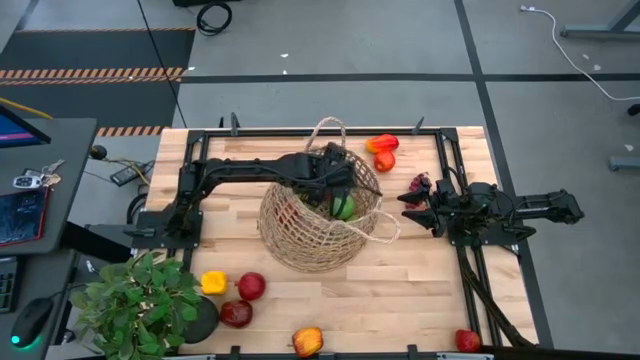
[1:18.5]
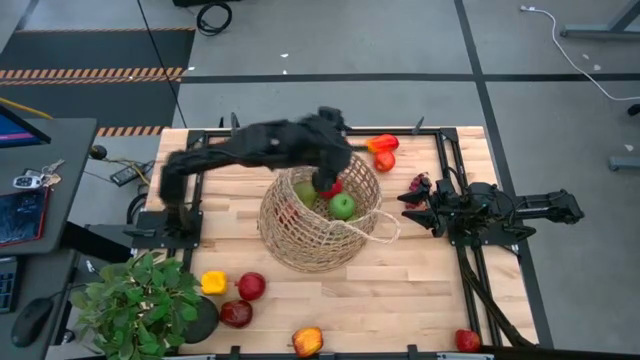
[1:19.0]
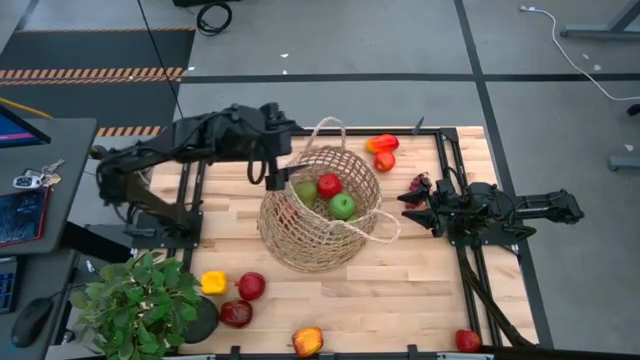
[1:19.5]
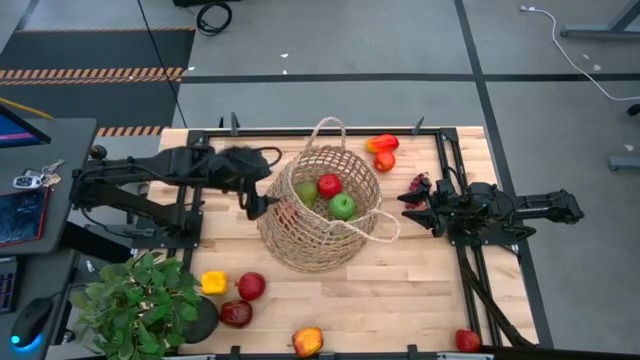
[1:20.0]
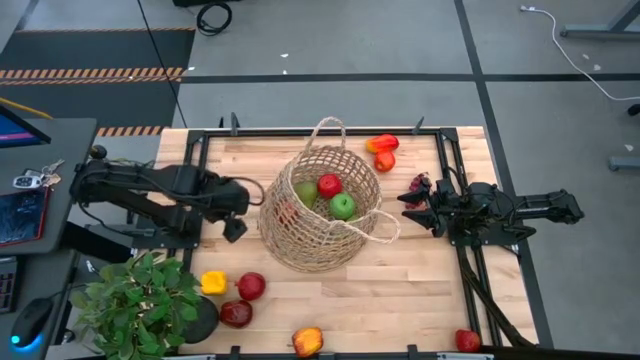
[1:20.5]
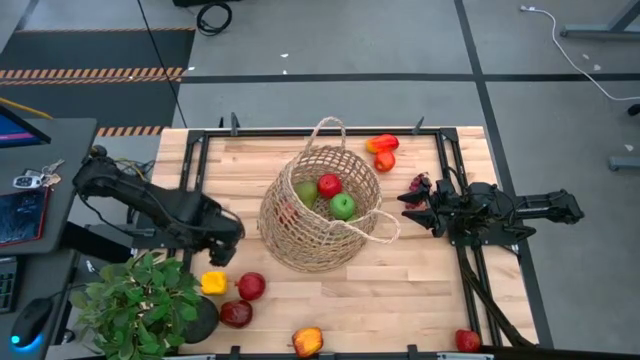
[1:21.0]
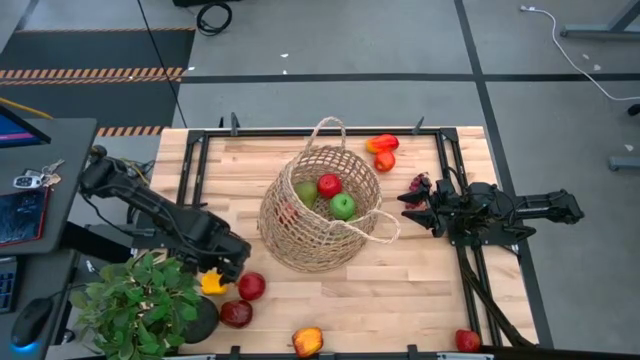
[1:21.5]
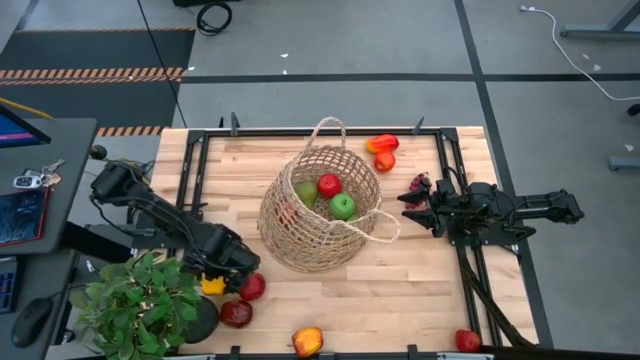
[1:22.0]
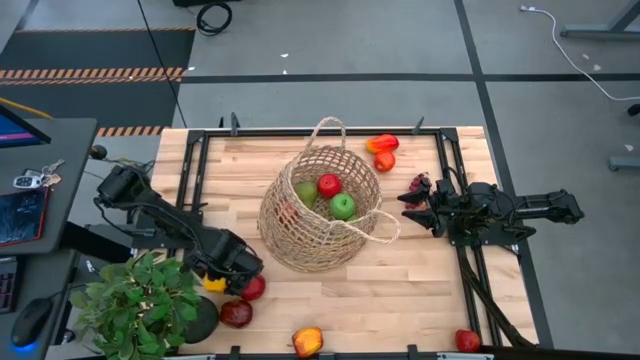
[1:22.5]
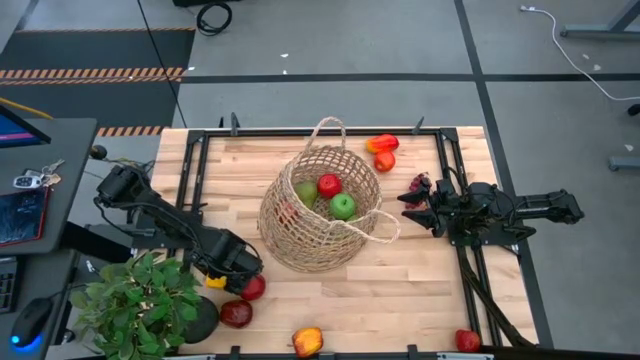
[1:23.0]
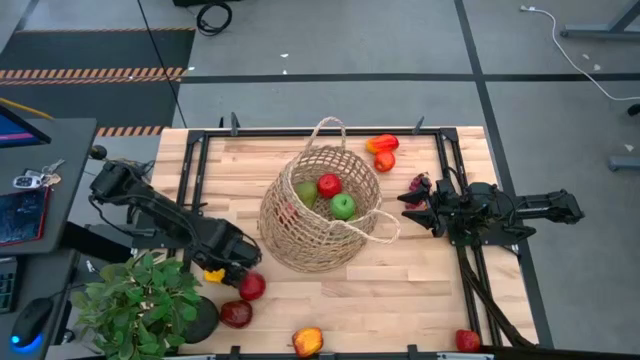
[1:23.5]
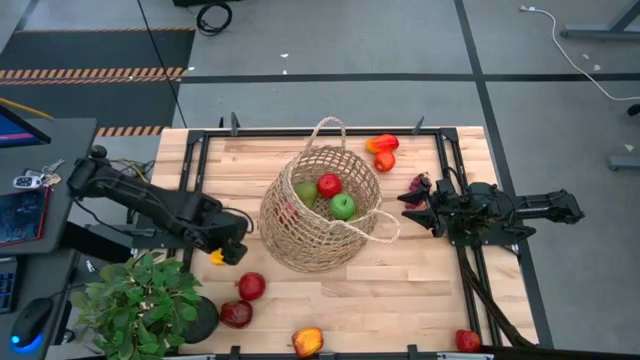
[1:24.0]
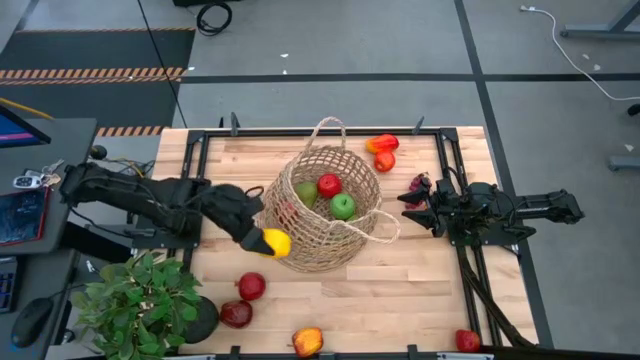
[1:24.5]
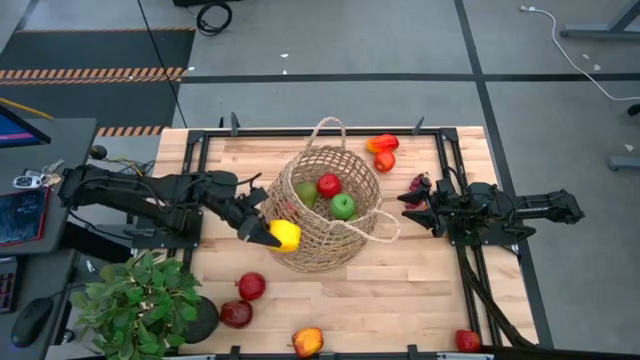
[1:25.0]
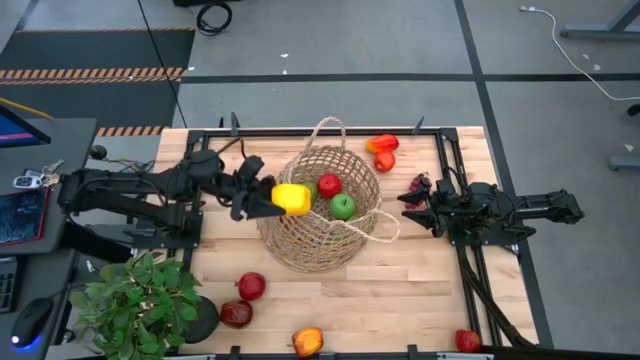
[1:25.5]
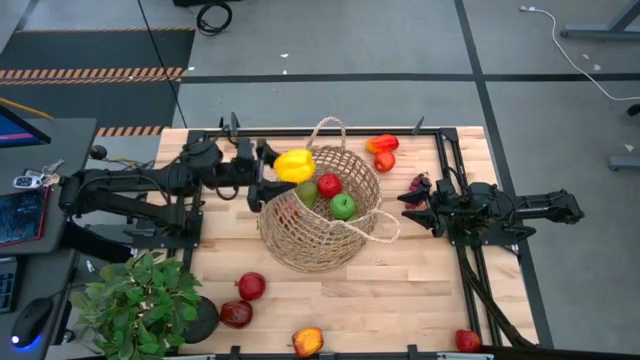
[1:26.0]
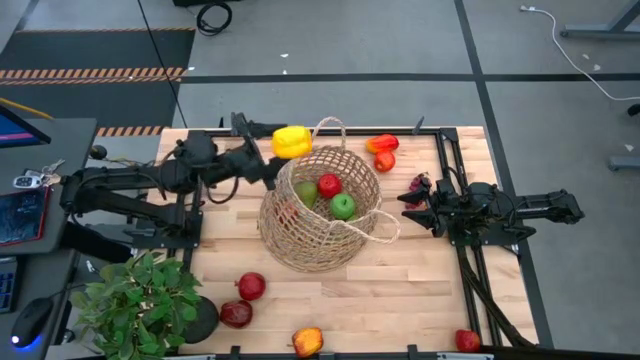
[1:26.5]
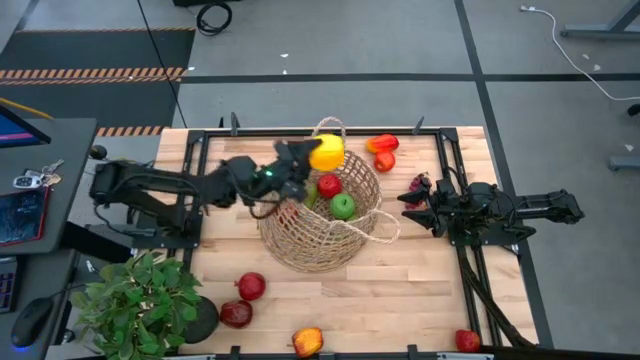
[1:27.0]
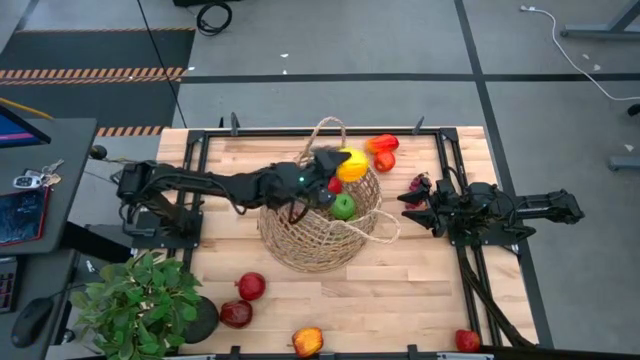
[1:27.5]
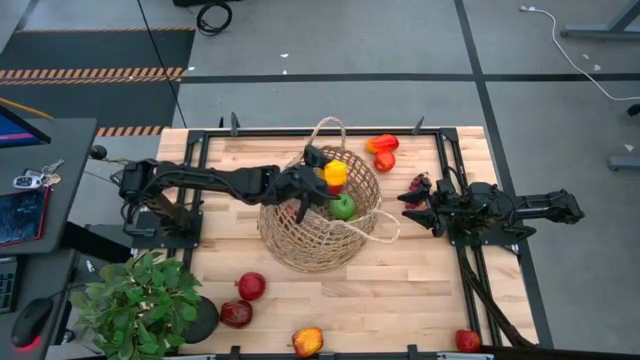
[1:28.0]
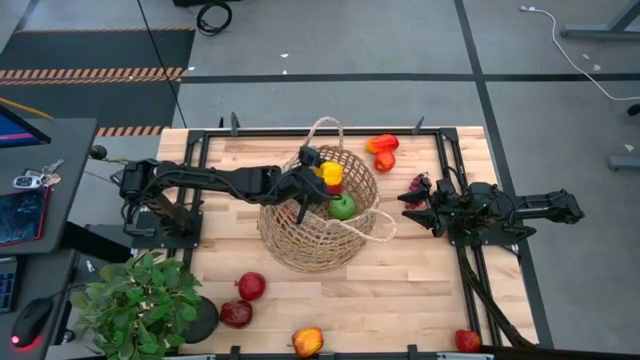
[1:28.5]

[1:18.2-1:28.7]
Task: Build produce basket
Put the yellow bell pepper into the basket

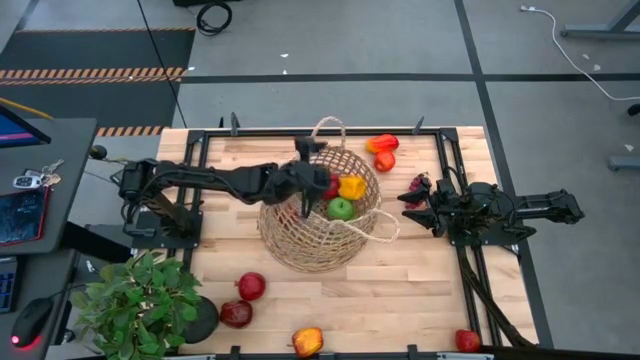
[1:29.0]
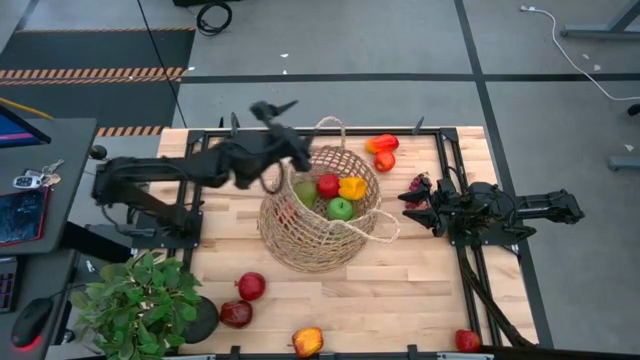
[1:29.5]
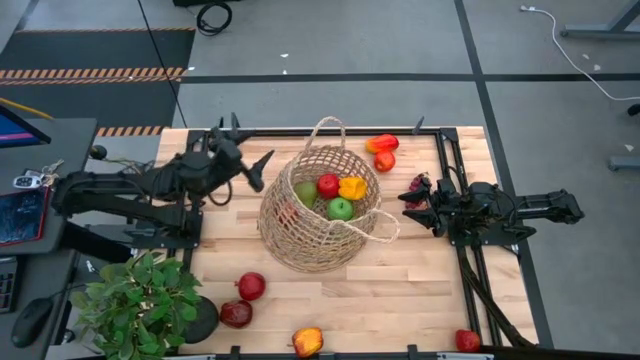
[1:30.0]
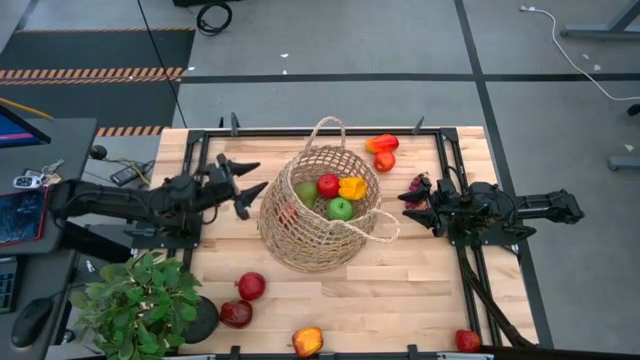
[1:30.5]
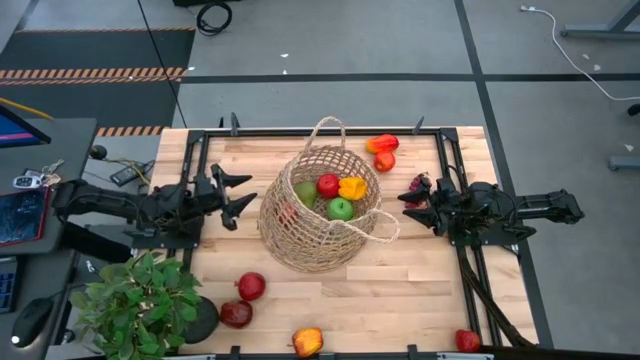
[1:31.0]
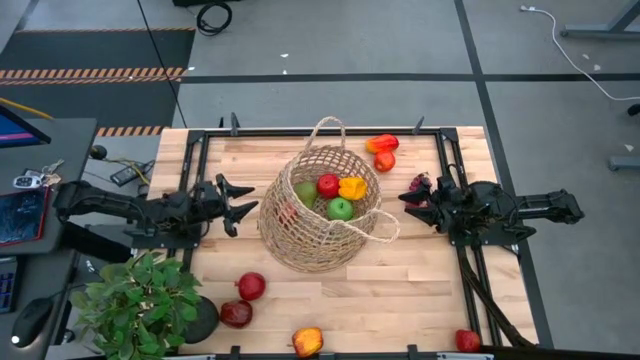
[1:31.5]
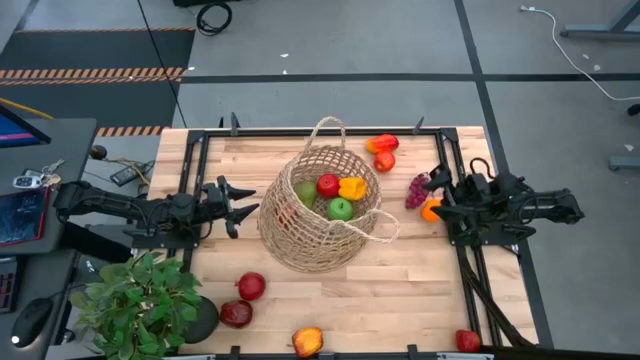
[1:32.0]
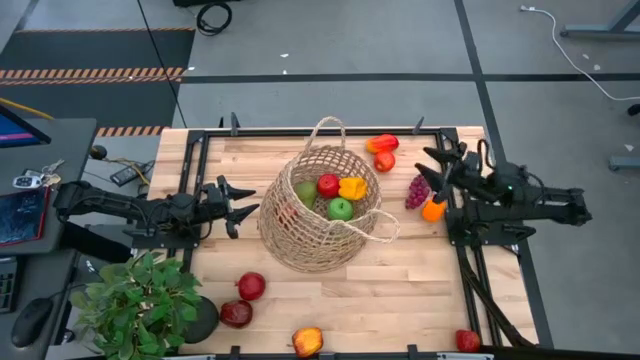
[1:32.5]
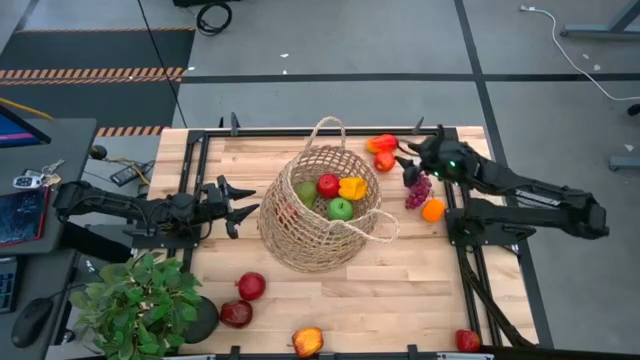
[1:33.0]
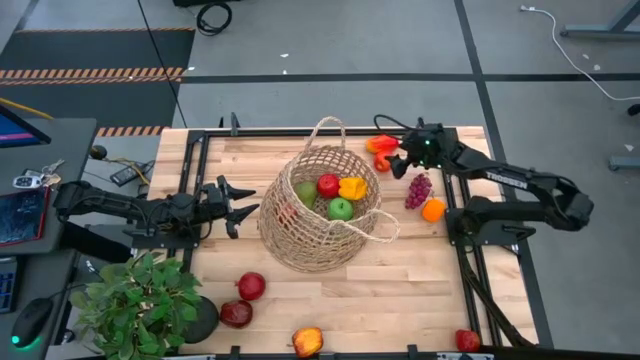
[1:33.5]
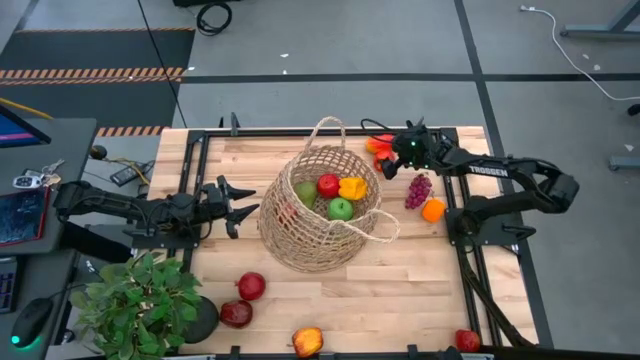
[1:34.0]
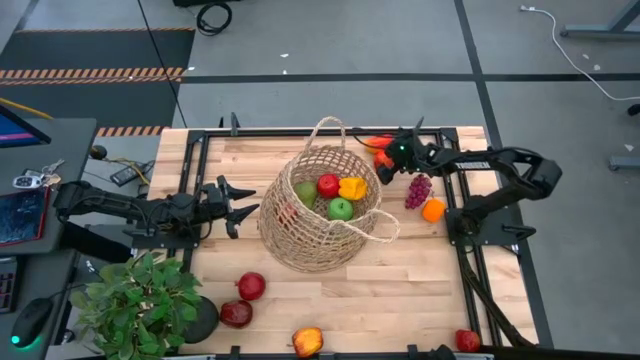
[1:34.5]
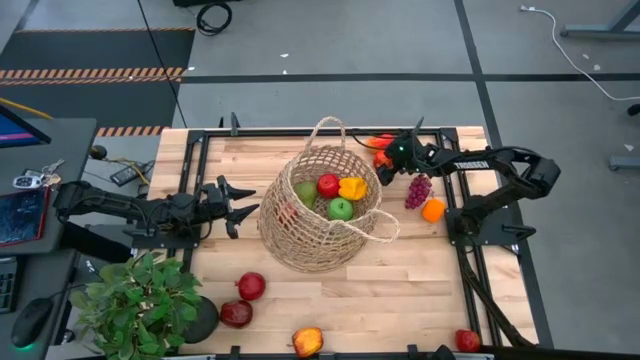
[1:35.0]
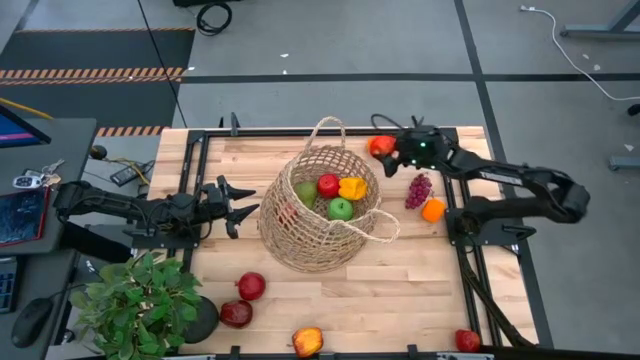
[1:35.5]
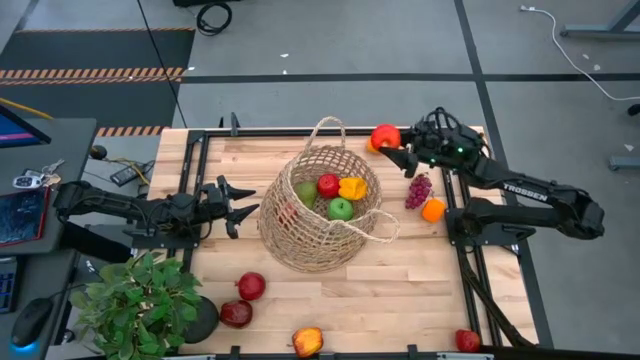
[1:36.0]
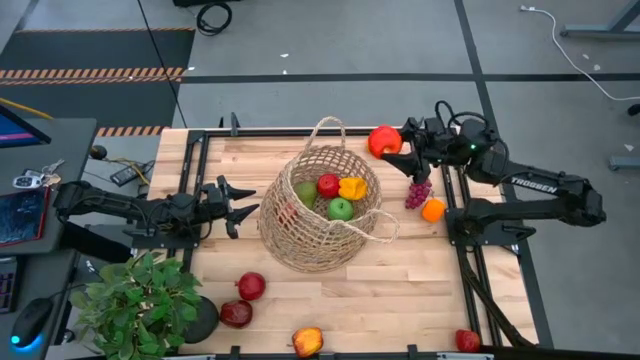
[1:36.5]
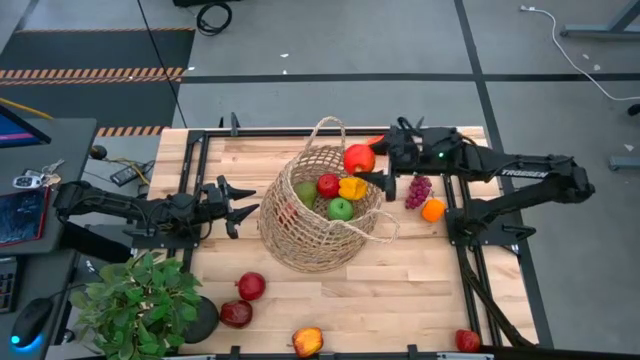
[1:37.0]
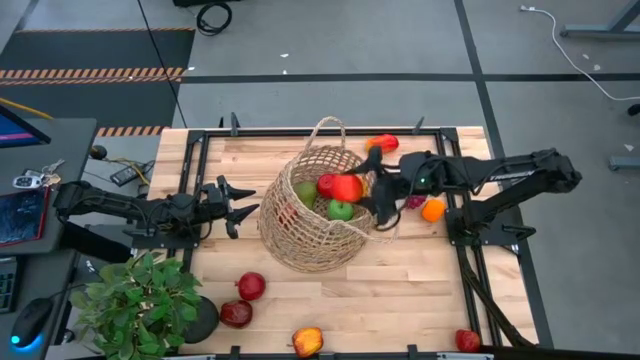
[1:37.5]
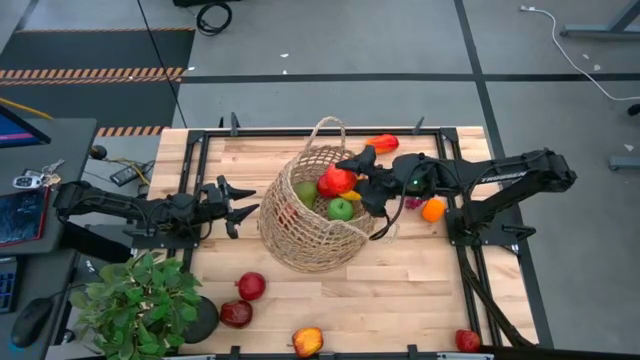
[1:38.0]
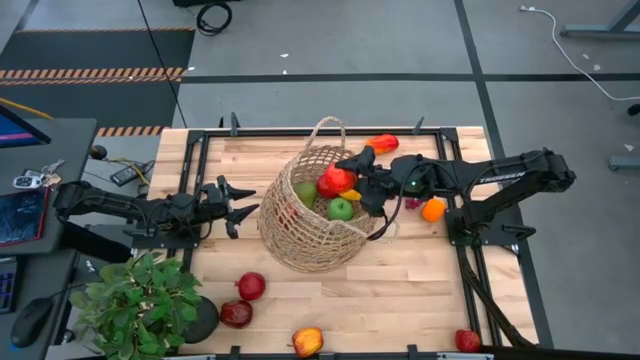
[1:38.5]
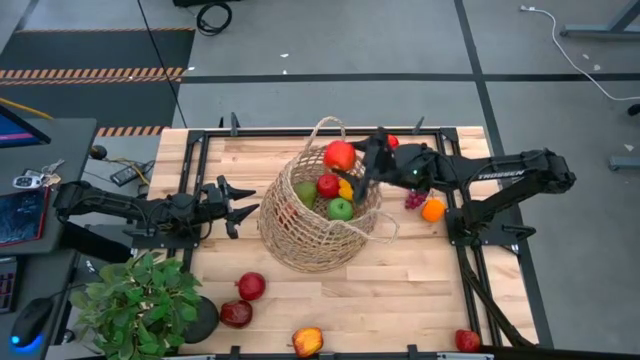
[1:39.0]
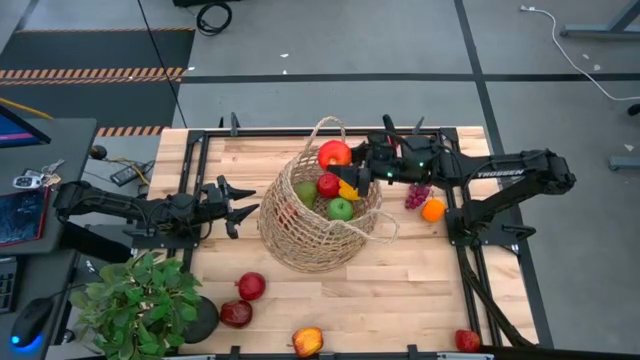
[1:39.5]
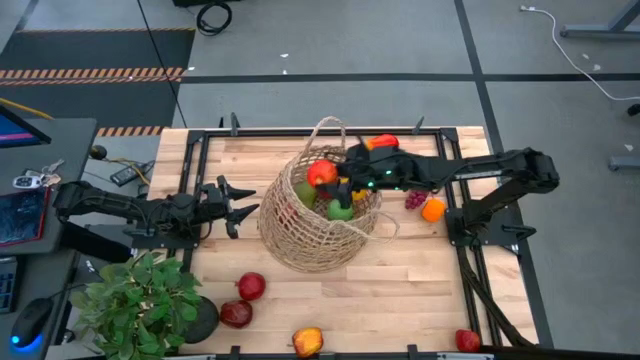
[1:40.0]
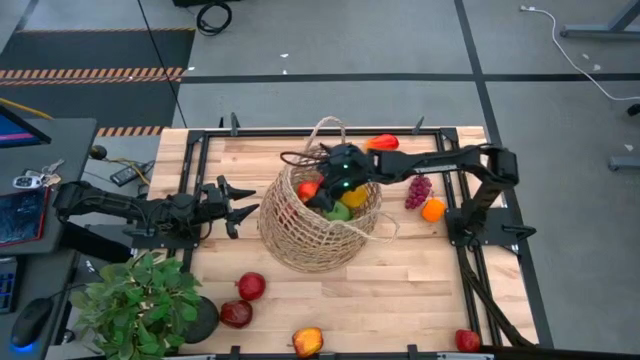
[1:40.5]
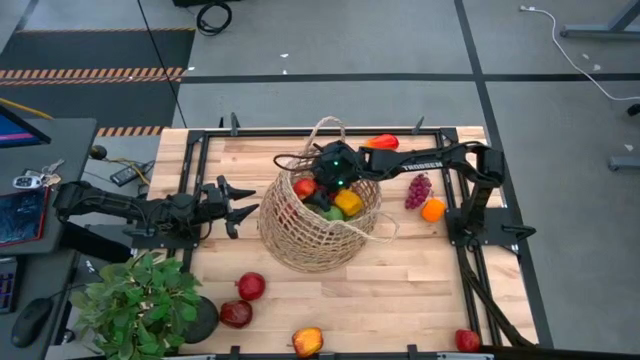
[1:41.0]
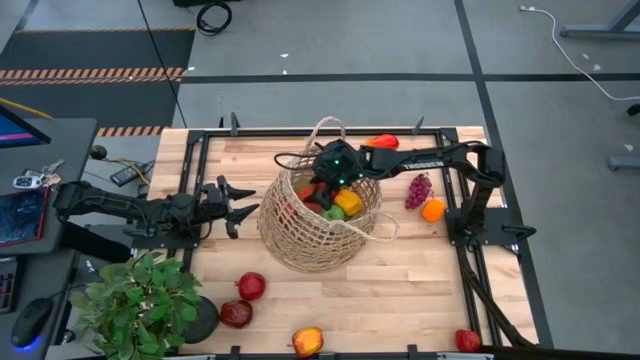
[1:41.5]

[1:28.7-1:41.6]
Put the red apple into the basket
